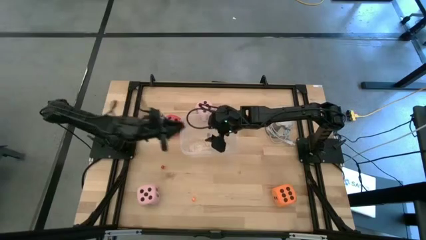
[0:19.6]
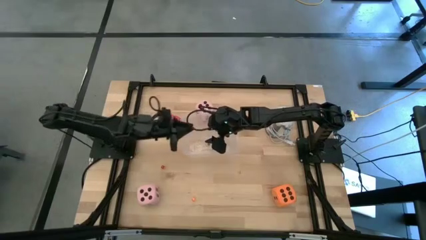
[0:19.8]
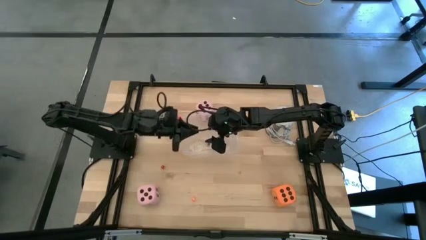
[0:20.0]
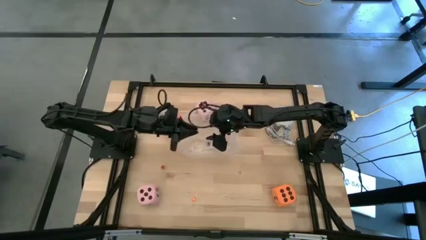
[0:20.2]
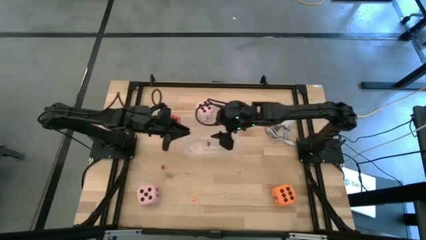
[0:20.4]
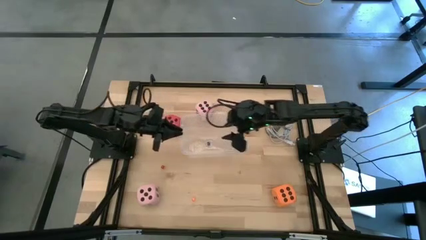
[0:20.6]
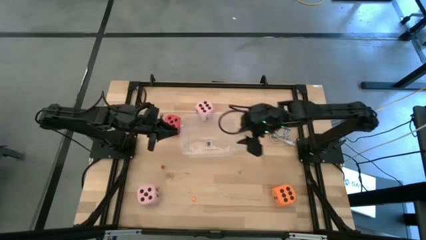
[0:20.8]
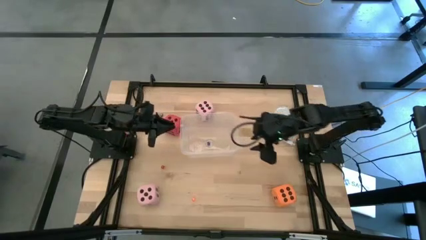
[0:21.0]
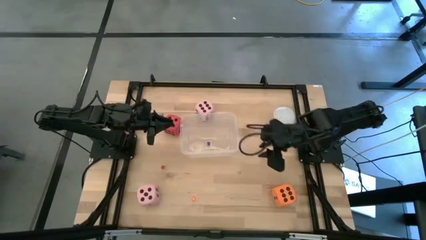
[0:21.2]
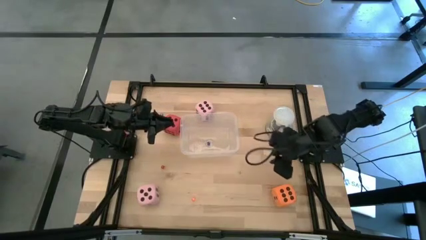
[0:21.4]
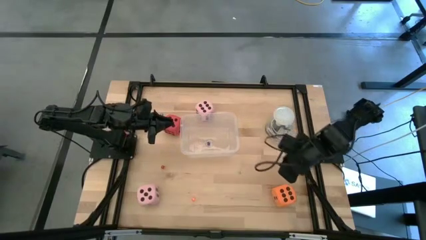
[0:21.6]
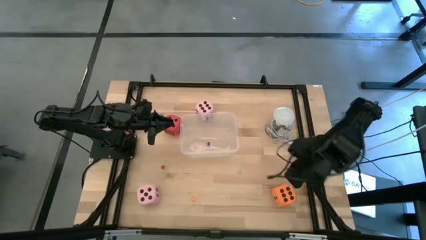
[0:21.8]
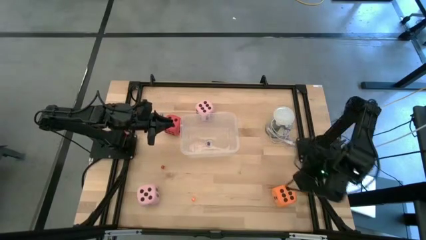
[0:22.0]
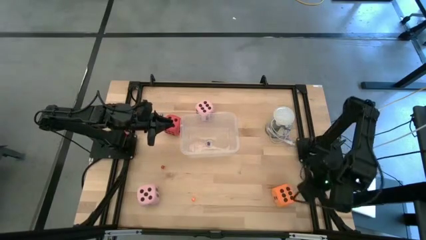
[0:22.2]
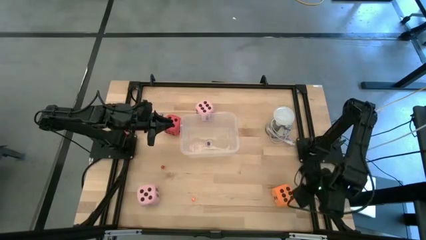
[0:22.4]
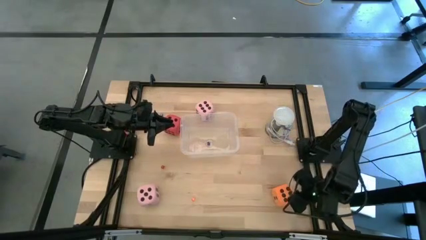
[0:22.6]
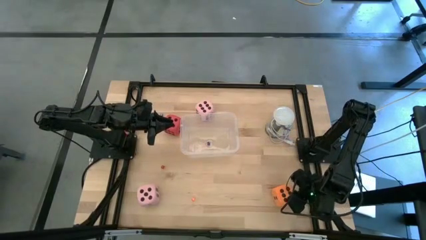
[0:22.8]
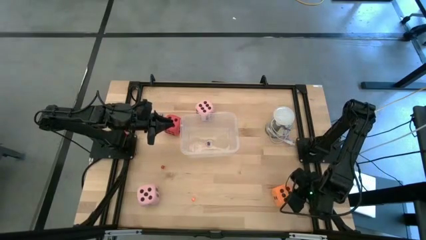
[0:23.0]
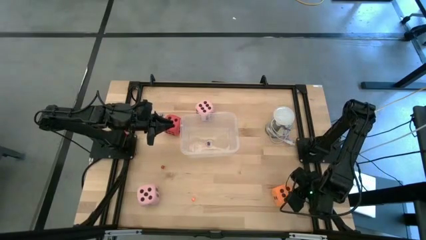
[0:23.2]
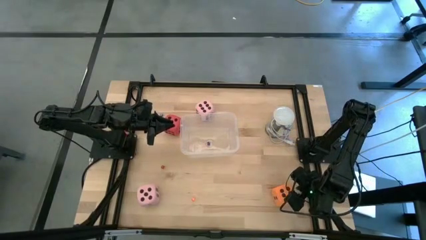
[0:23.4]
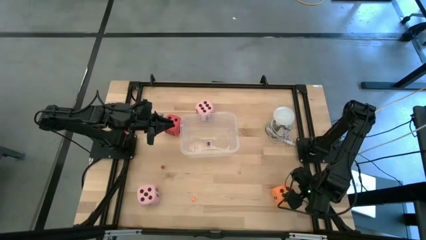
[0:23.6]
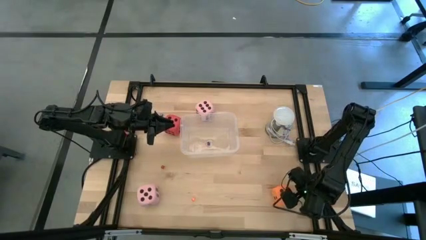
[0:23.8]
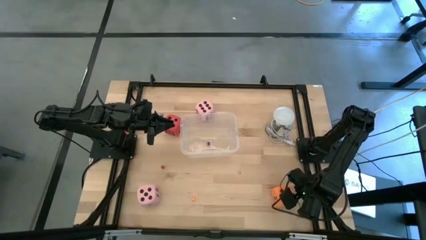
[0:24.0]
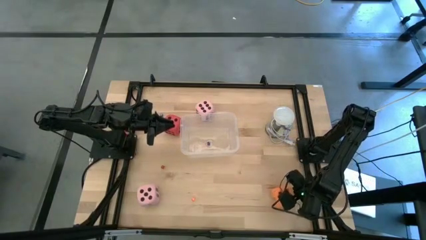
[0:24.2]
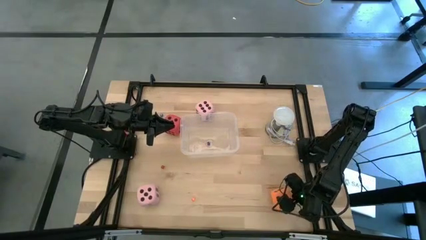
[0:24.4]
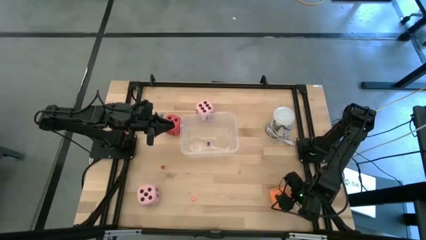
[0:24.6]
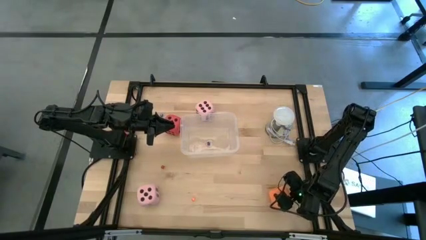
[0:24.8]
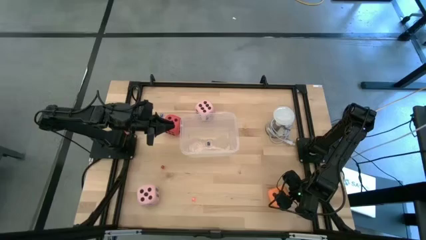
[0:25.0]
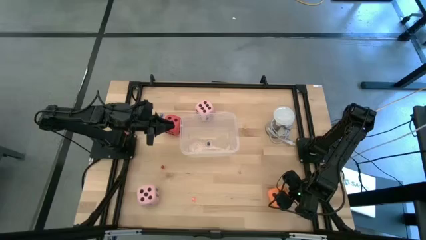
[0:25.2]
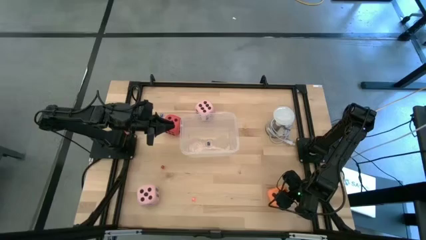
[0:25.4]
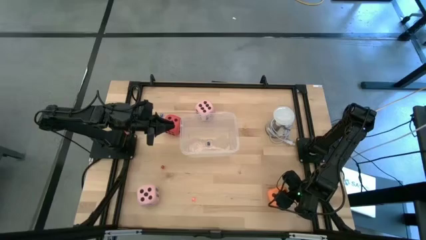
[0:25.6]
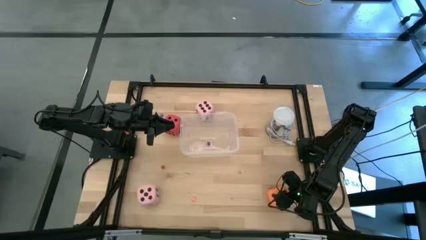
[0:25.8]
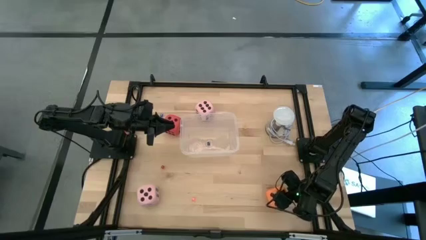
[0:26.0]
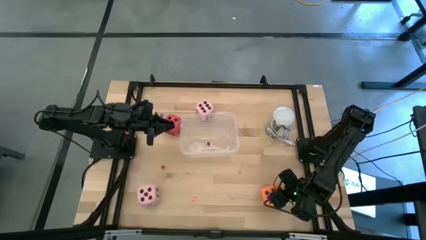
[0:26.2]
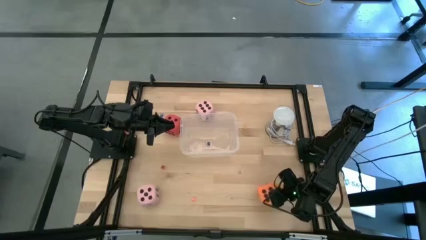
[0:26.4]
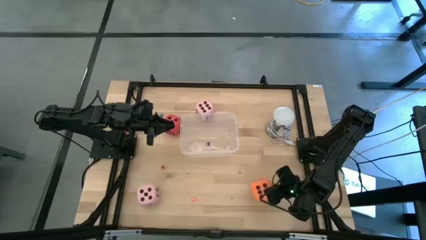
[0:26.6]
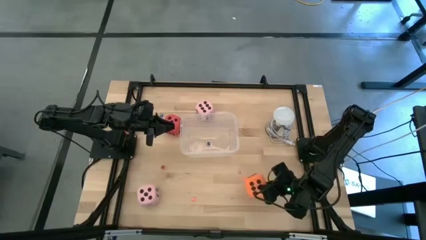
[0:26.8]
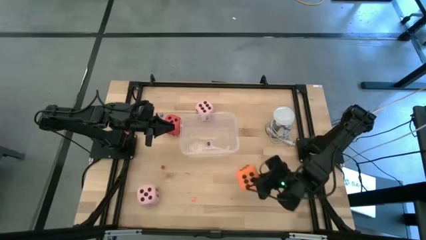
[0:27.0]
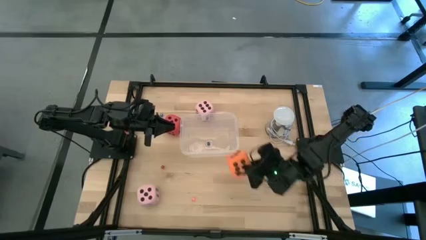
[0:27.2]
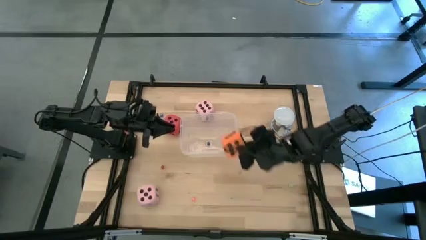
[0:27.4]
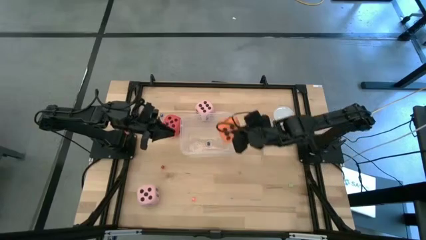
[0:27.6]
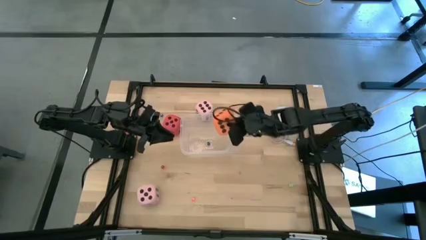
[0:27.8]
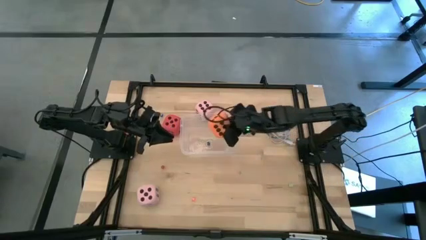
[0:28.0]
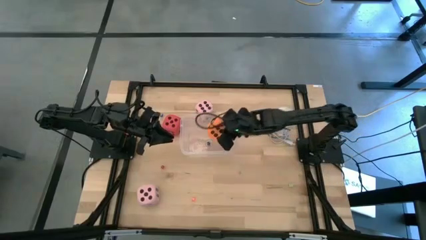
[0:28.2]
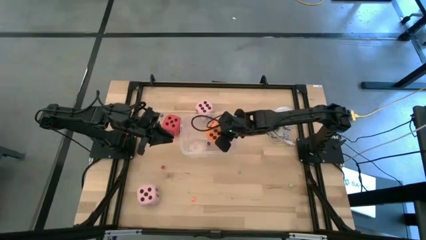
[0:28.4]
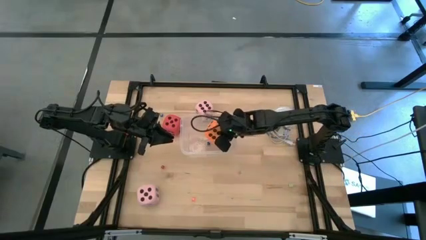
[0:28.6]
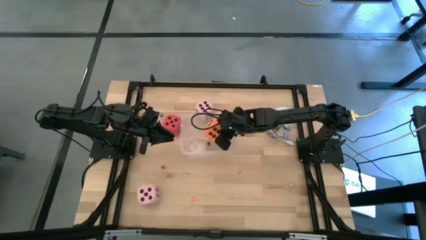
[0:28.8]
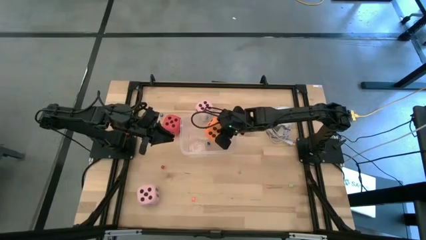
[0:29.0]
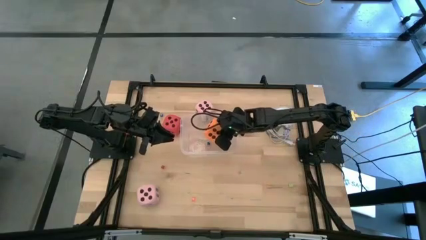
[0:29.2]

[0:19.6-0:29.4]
Task: Pick & Place Dice
Put the large orange dice into the transparent bin

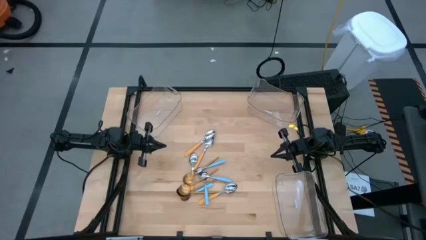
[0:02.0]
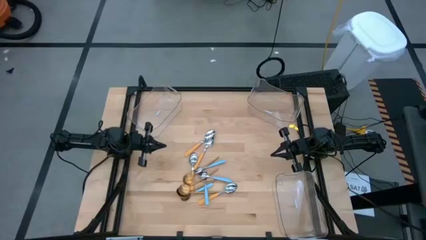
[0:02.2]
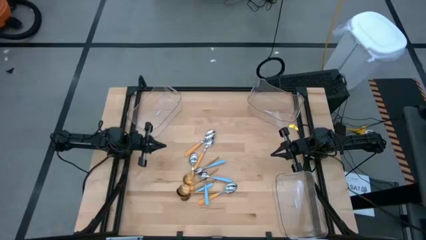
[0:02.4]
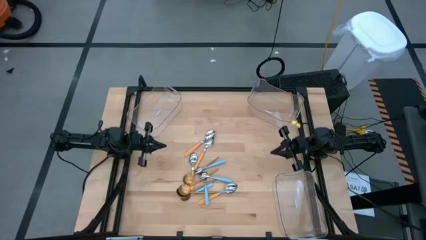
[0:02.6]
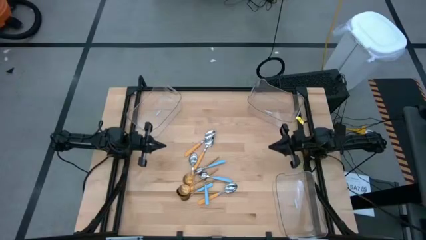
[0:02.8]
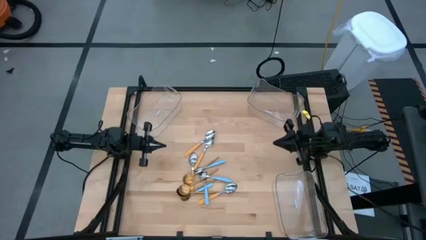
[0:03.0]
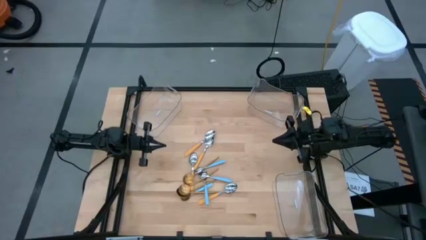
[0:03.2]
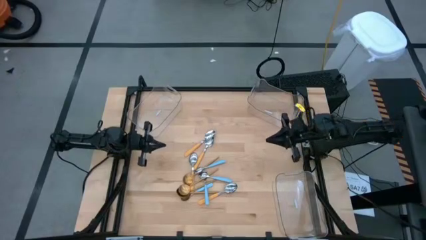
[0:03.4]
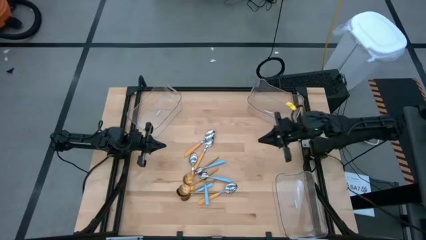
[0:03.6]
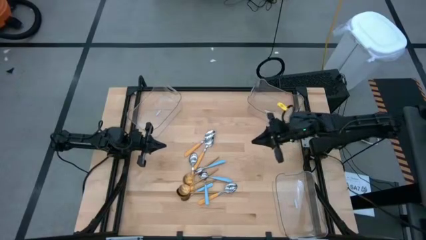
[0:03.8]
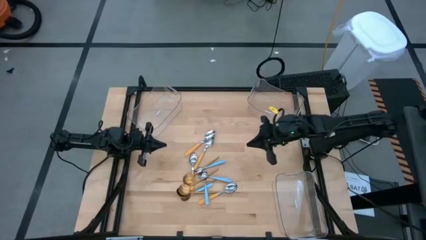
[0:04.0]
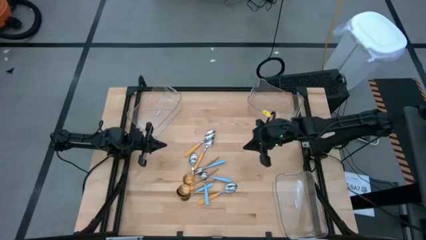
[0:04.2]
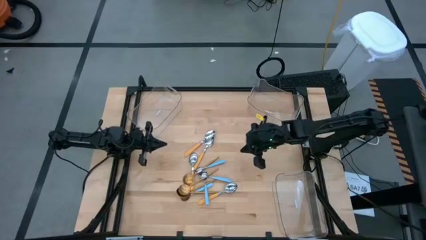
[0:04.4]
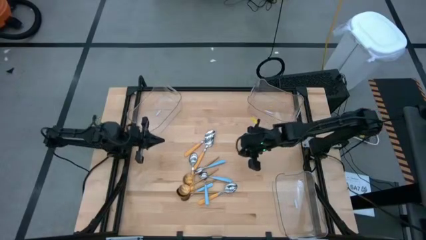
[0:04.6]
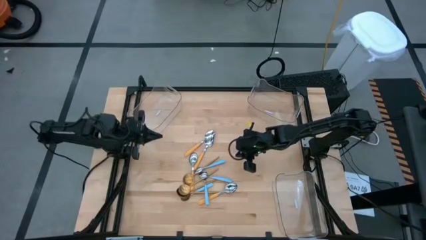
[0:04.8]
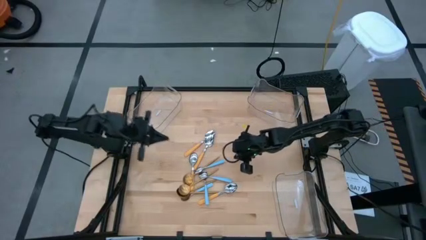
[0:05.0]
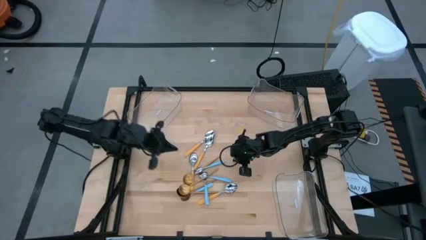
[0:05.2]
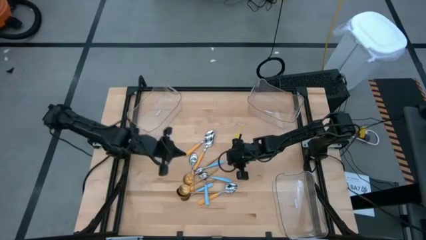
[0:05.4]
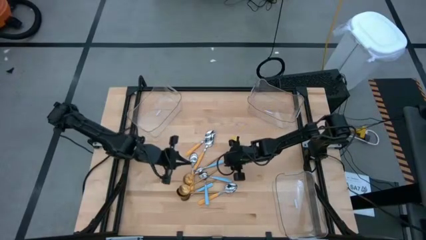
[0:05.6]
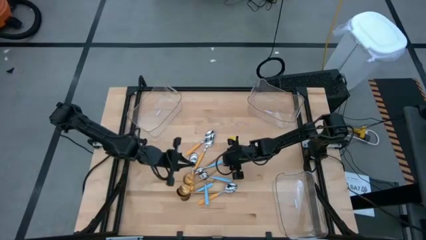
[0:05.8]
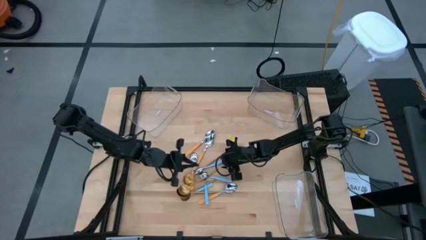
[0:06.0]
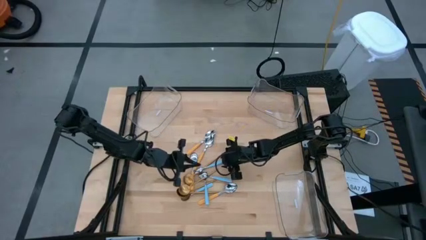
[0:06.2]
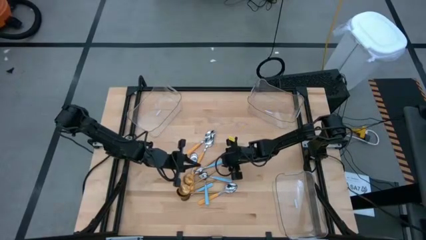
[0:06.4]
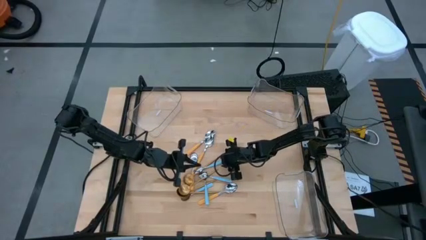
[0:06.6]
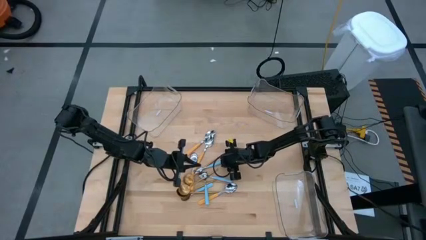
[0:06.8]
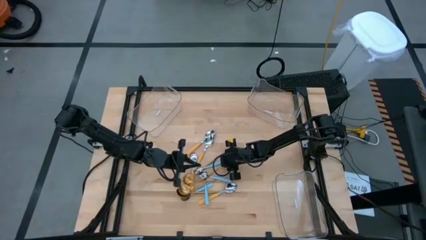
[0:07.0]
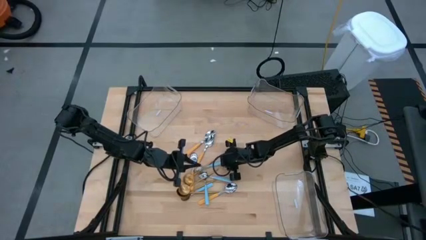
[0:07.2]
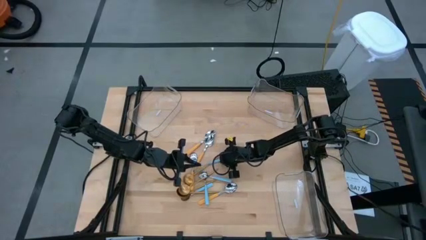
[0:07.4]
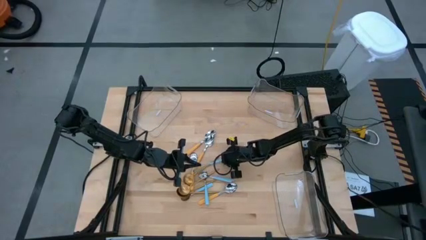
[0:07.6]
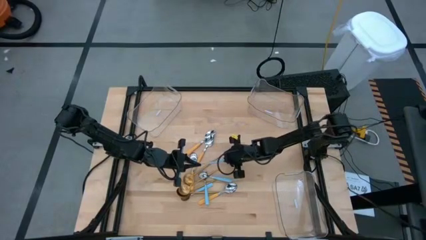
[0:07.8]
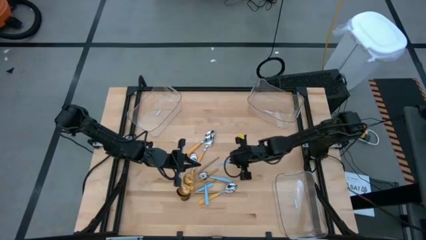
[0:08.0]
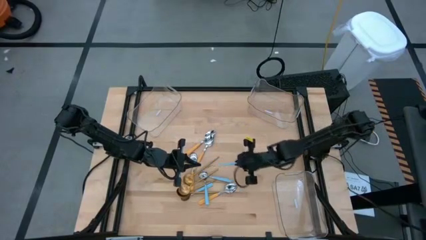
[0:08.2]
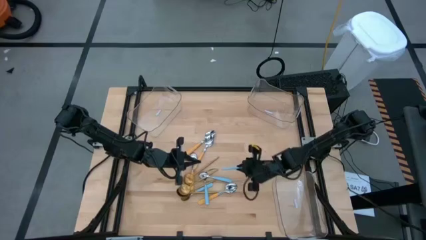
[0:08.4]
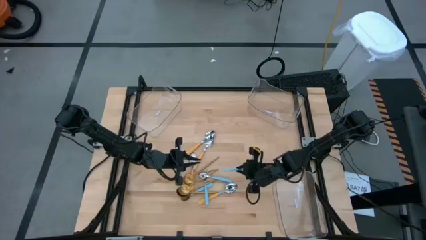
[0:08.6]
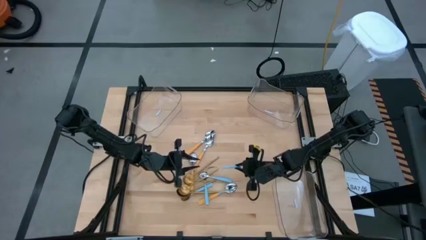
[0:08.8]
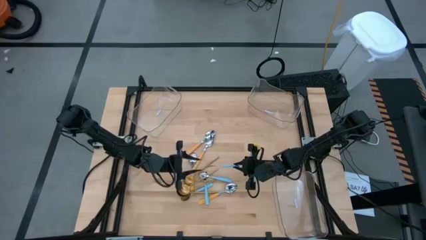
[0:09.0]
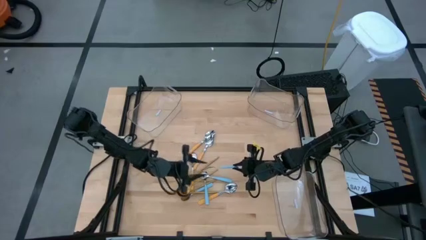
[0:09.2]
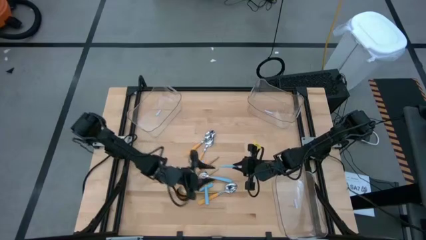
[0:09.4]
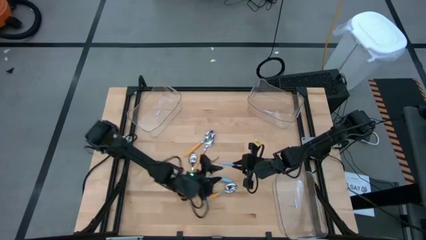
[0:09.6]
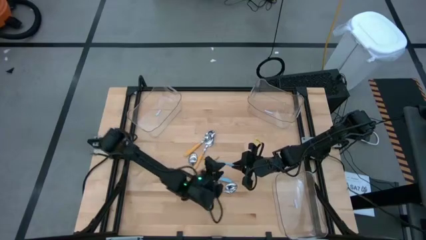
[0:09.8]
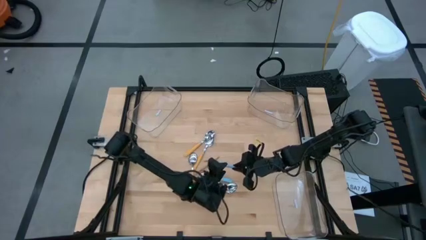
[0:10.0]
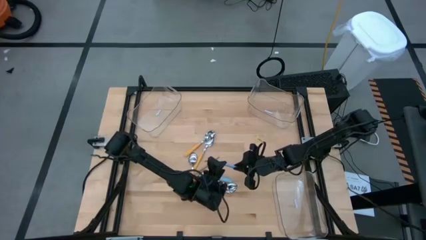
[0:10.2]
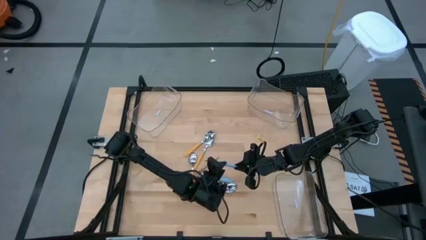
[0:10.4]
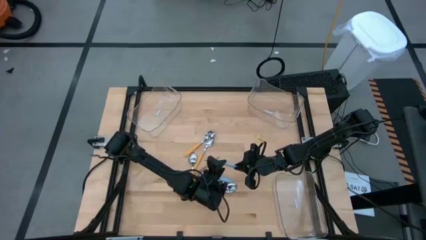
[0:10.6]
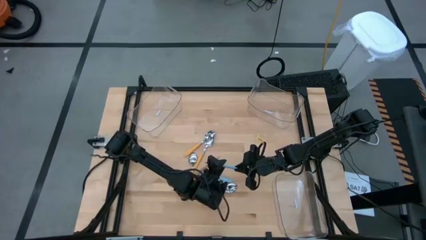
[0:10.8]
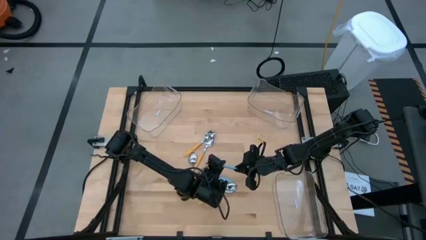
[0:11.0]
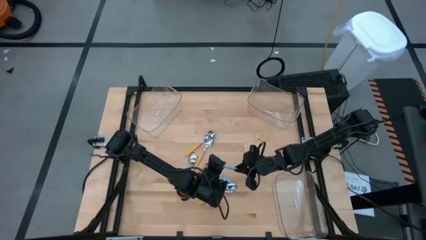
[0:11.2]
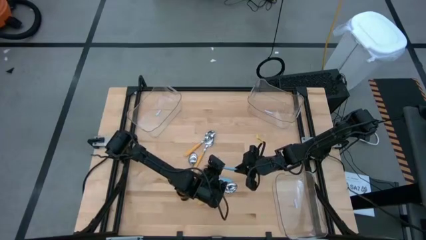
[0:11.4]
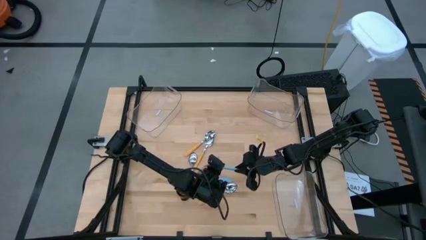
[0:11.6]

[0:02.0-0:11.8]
Task: Sort silverware by color (type)
Put the blue spoon into the top right transparent bin
